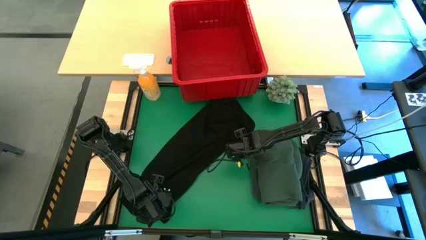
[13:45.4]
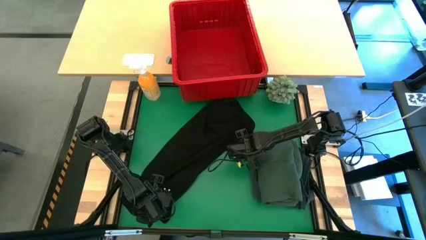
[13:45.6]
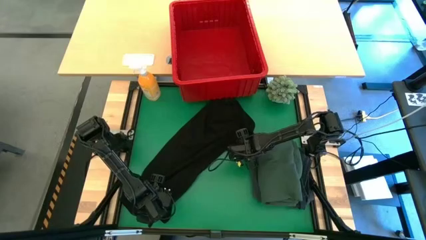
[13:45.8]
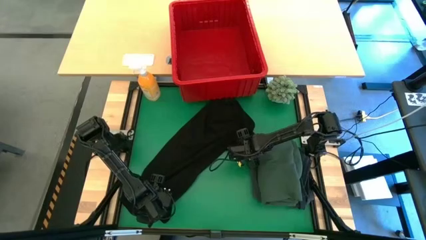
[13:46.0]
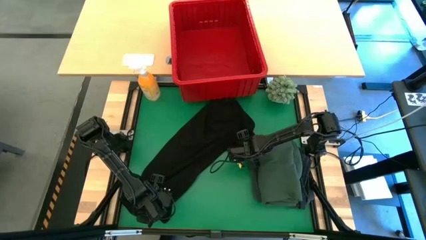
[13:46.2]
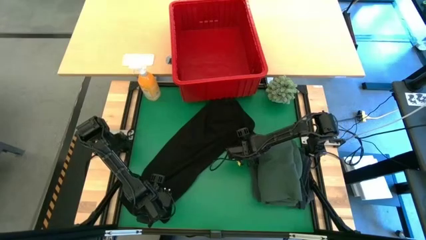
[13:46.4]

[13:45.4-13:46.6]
Task: Fold Laundry from Bin
Fold the black shirt

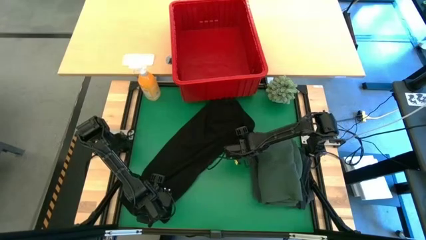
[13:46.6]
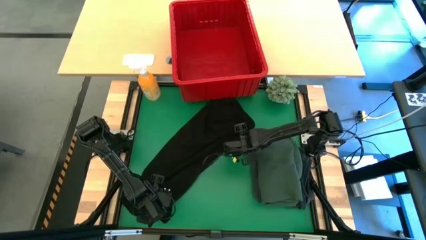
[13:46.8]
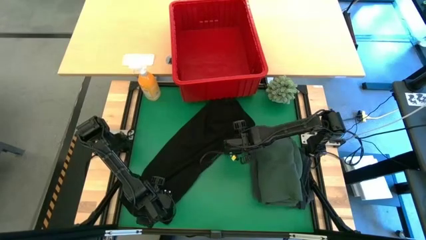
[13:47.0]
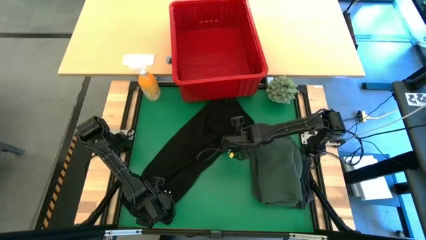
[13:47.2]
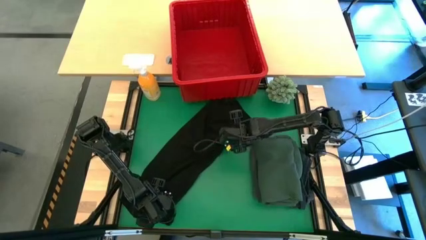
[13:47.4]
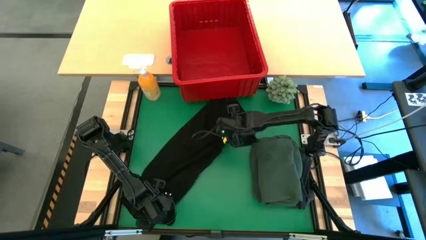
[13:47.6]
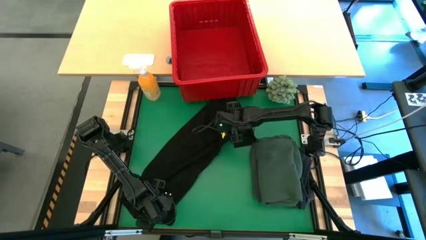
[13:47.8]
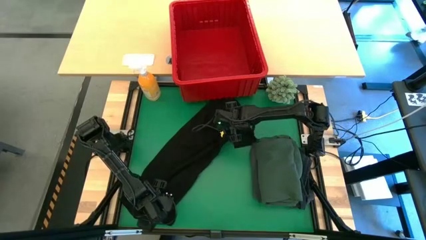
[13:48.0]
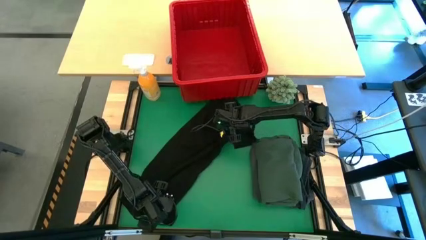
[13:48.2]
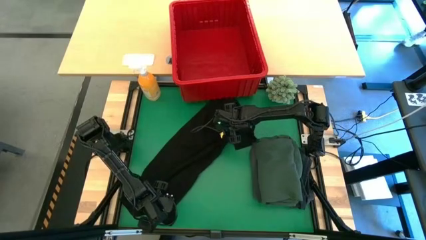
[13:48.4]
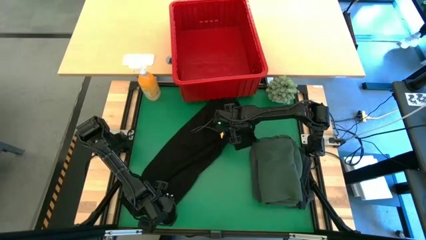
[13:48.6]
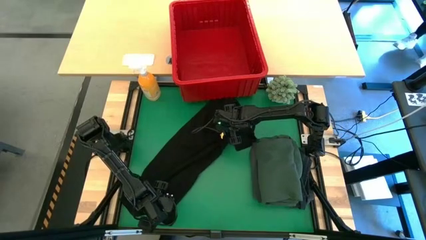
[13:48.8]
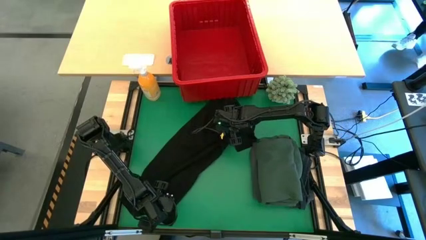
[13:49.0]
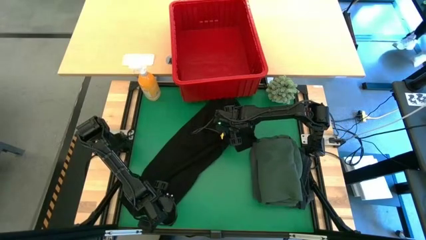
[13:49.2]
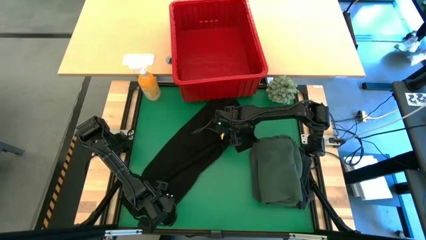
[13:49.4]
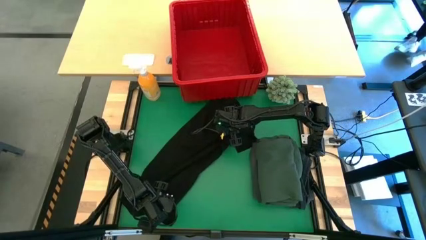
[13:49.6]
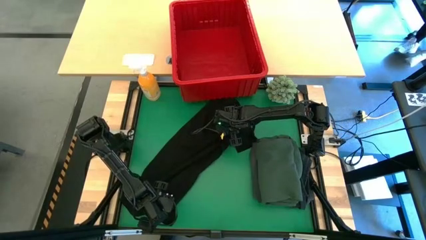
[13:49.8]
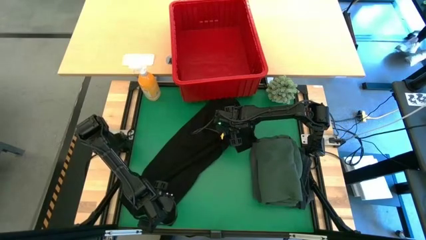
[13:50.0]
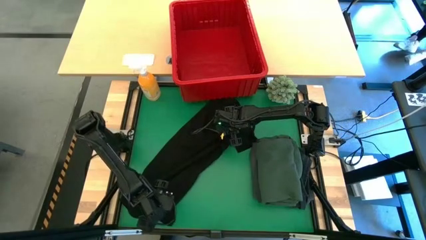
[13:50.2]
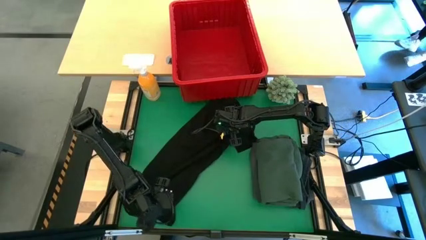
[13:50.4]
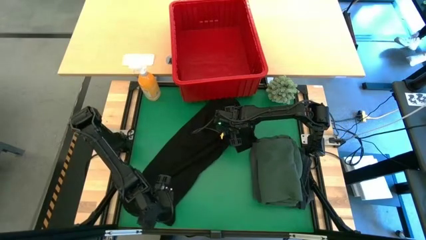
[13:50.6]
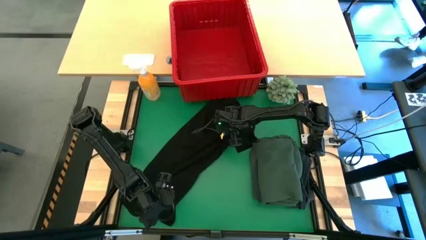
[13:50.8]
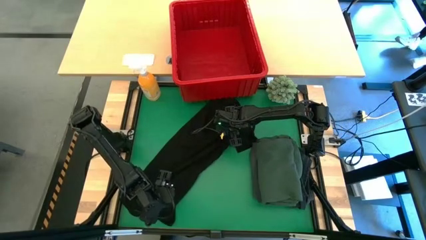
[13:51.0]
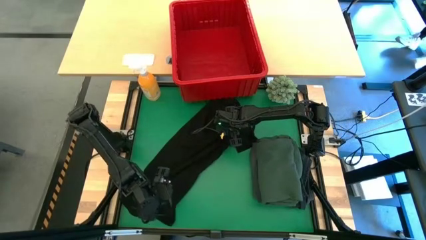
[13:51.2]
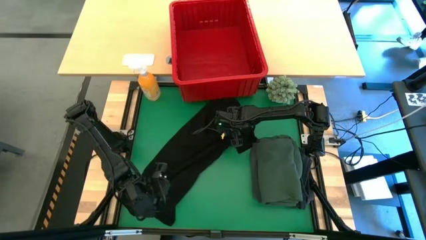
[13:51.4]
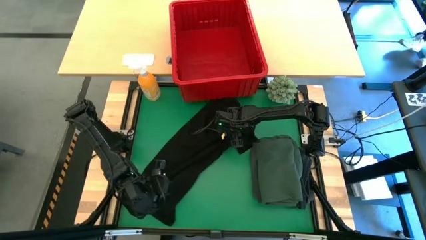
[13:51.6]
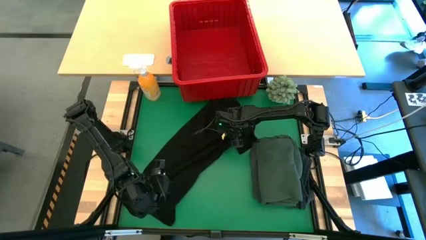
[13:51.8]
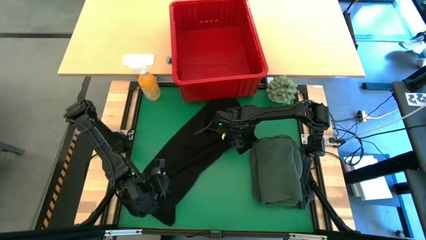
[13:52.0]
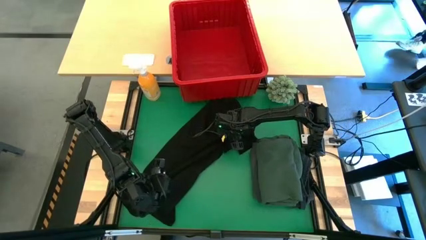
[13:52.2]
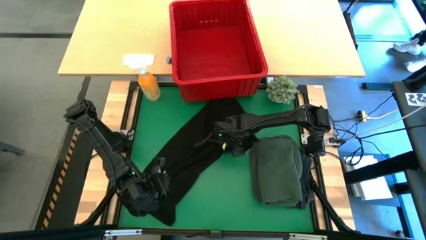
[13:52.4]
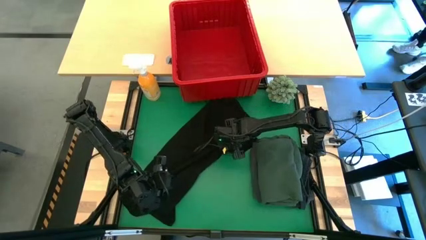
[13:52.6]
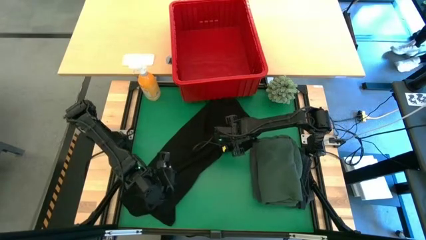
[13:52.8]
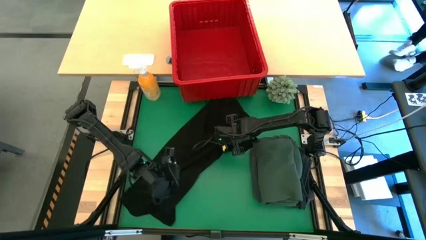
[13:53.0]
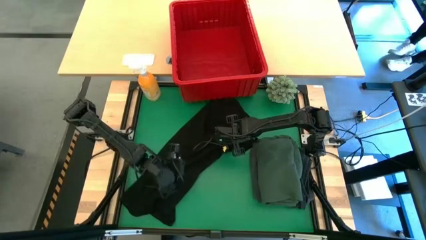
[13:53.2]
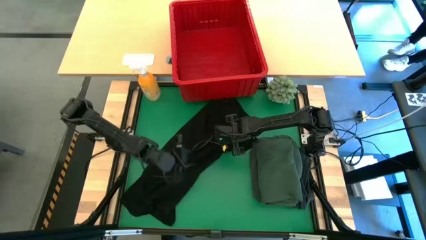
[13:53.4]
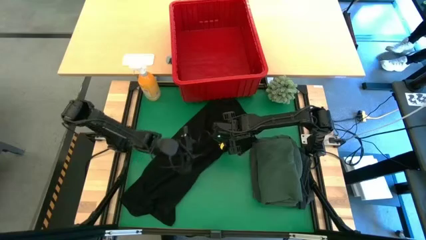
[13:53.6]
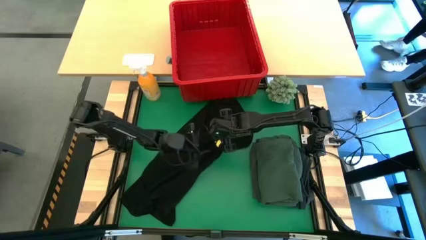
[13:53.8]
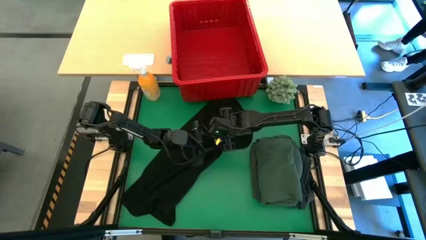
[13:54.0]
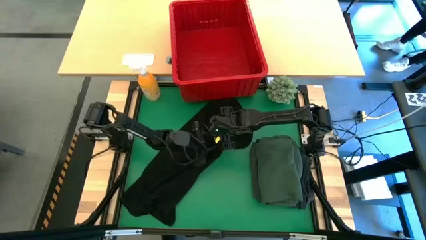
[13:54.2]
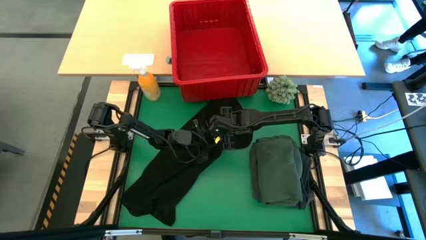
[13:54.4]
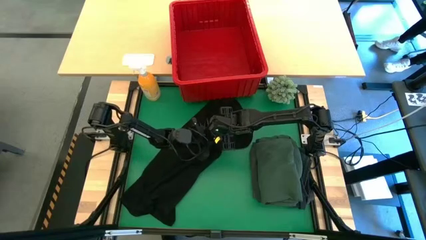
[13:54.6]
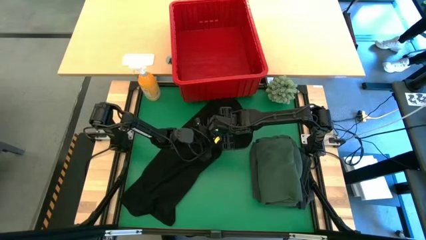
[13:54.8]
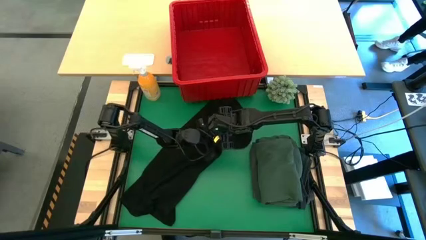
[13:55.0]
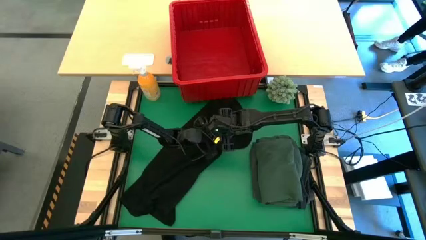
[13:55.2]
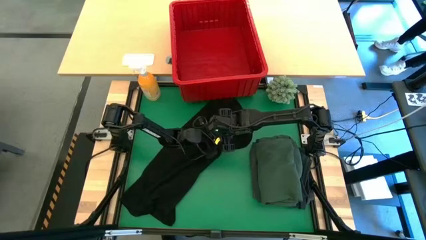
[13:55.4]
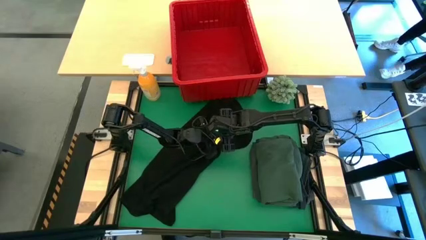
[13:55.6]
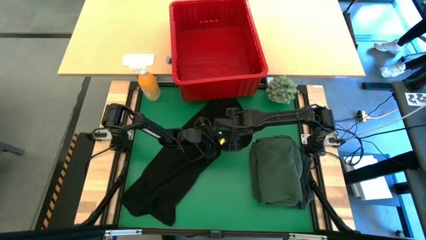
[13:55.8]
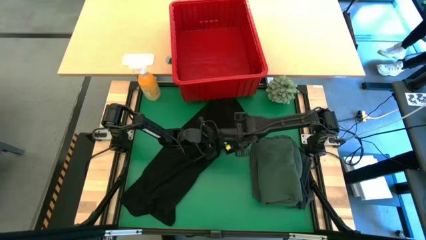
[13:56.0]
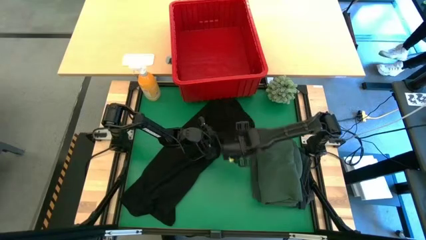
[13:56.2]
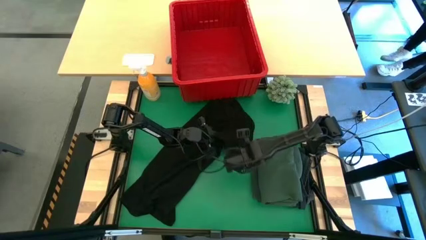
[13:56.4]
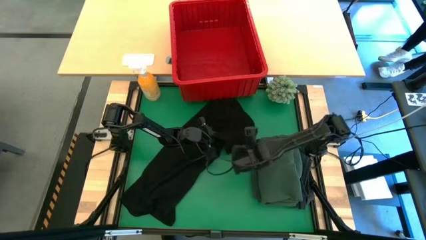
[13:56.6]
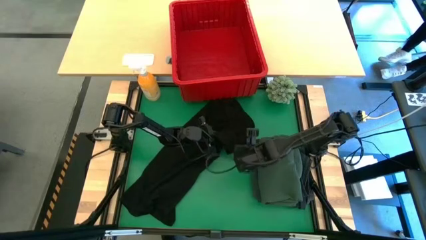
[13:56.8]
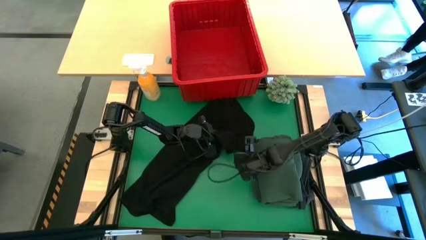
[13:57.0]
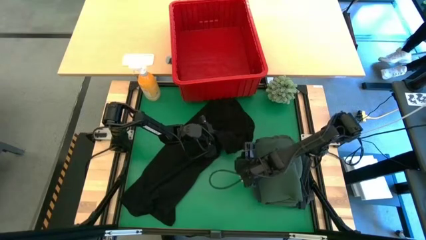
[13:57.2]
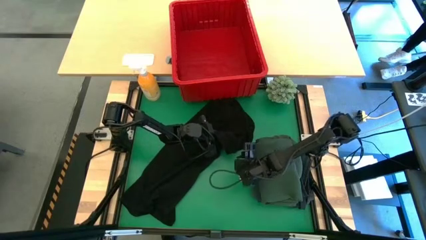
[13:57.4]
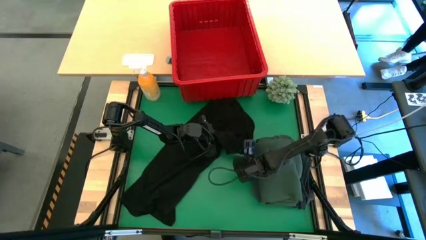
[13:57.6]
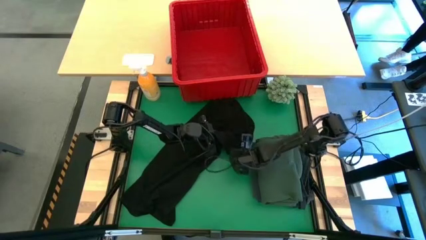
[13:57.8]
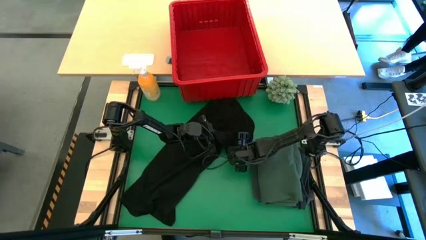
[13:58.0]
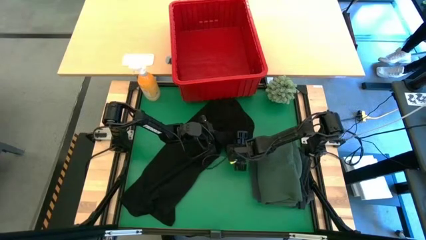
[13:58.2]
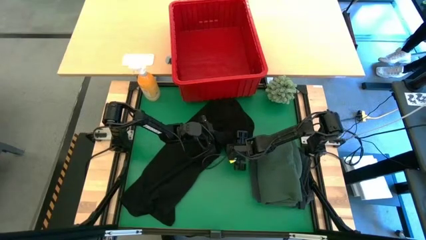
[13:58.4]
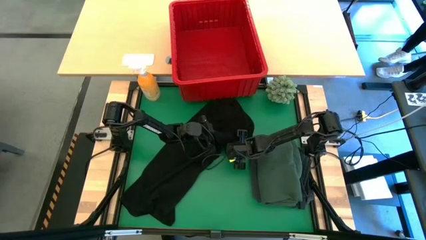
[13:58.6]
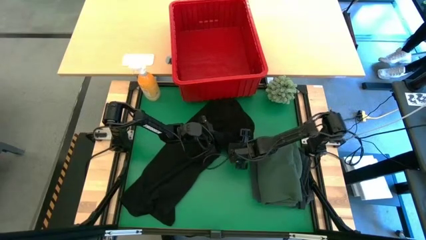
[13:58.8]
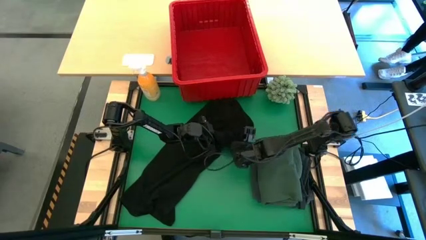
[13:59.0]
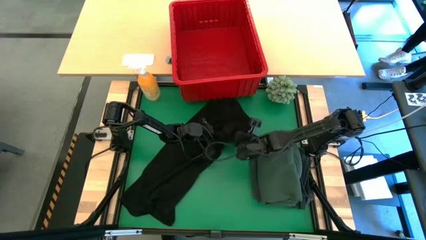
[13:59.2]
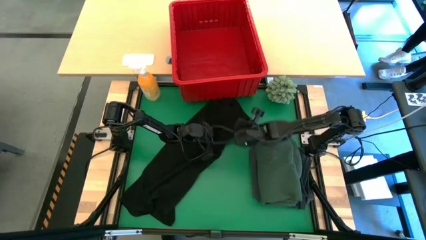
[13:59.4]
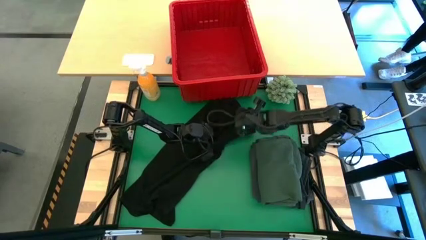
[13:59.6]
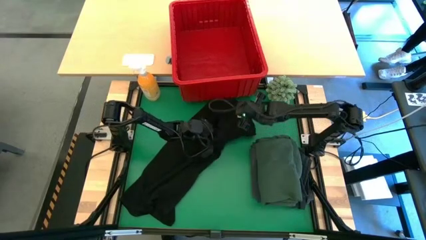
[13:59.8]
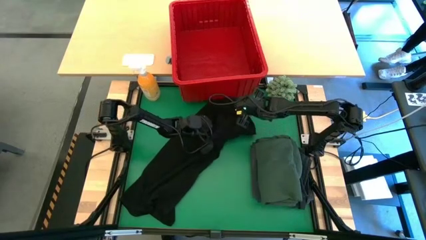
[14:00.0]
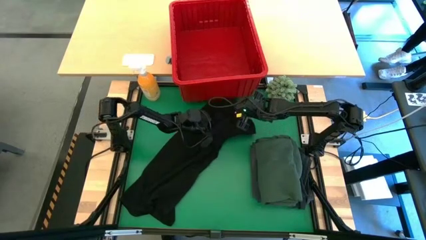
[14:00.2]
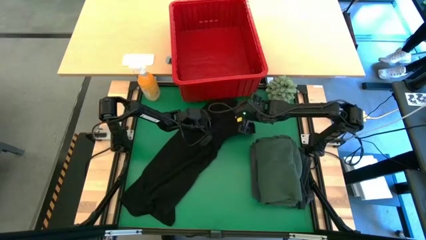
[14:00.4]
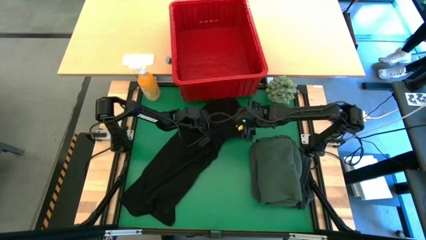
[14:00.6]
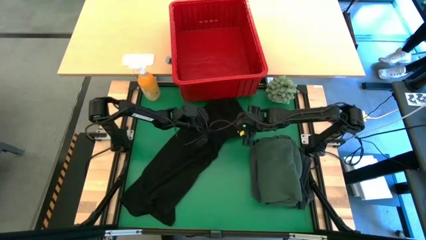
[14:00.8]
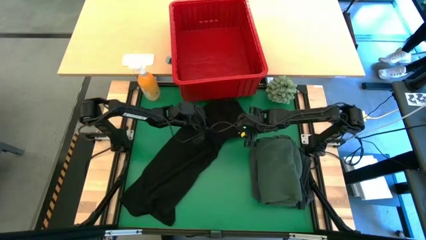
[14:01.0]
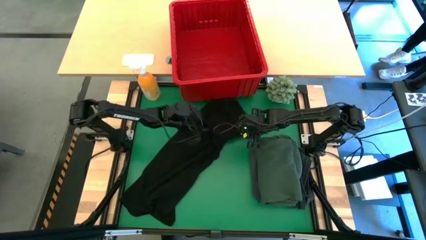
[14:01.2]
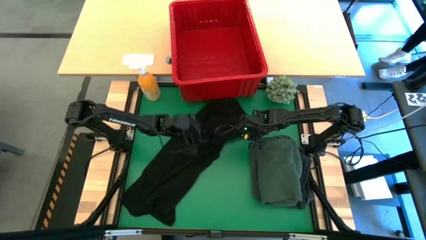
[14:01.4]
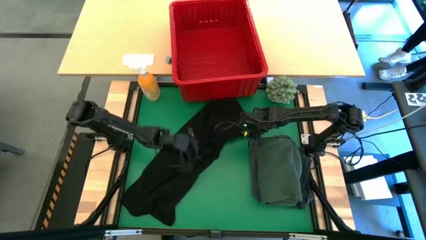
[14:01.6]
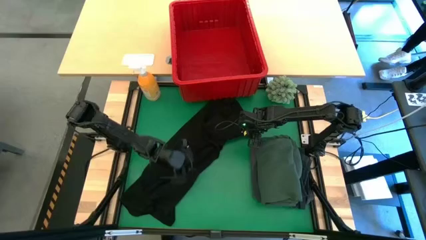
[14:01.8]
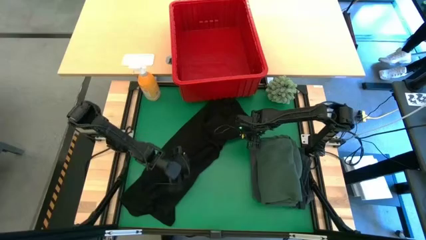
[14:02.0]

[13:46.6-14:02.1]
Fold the black shirt
